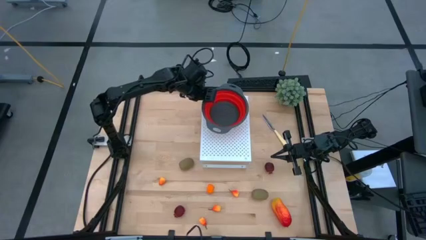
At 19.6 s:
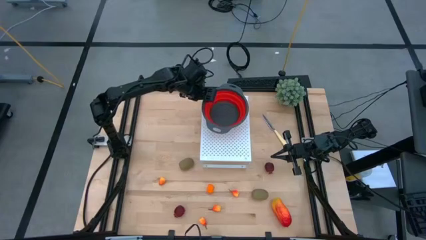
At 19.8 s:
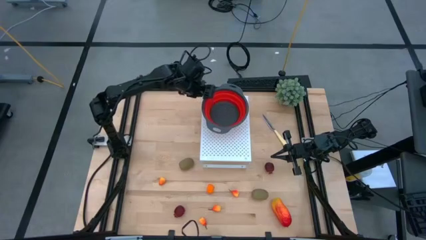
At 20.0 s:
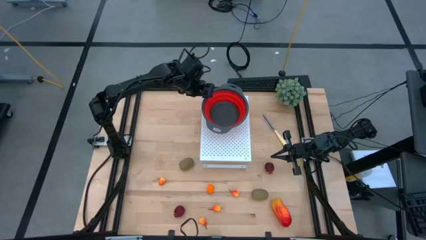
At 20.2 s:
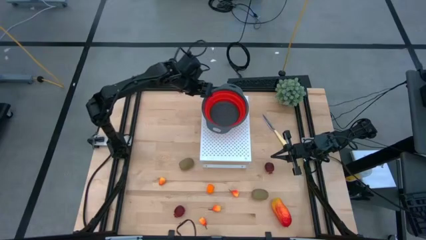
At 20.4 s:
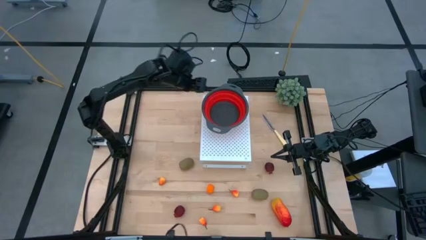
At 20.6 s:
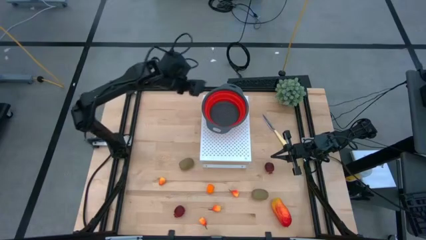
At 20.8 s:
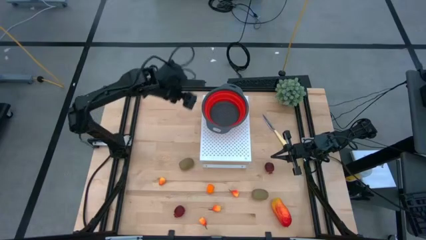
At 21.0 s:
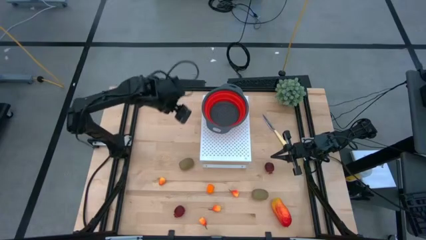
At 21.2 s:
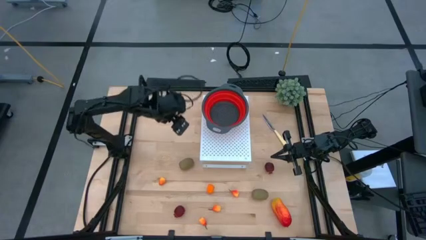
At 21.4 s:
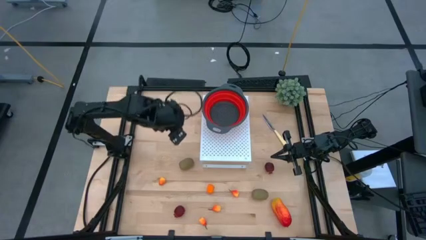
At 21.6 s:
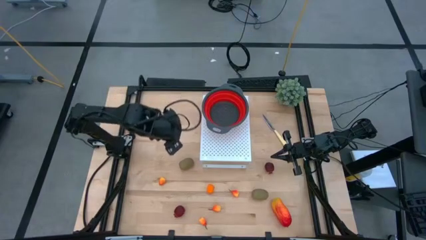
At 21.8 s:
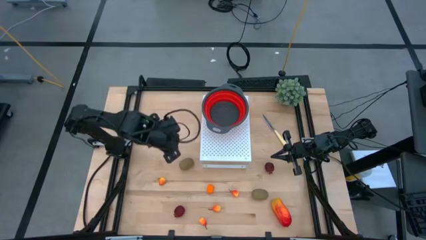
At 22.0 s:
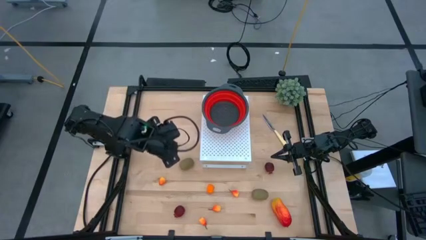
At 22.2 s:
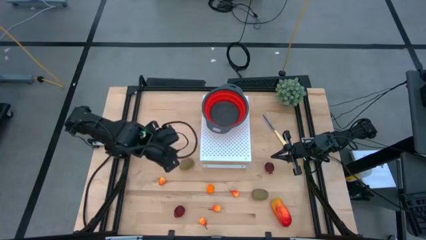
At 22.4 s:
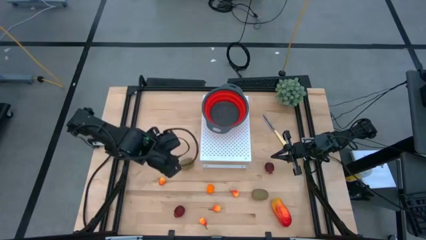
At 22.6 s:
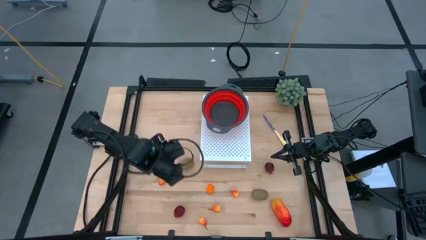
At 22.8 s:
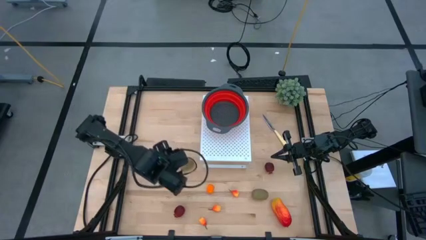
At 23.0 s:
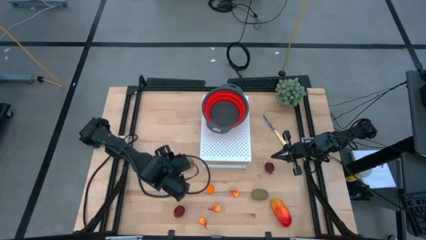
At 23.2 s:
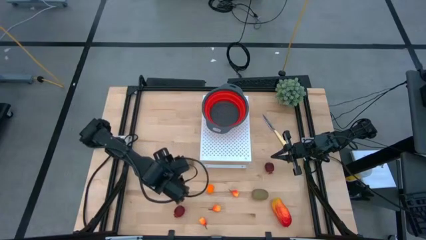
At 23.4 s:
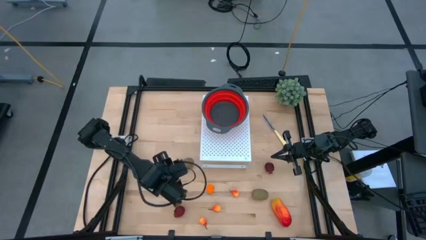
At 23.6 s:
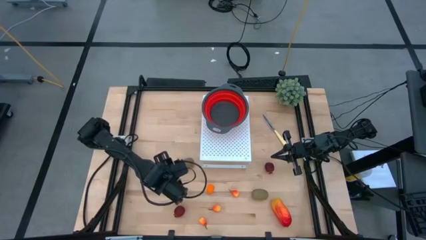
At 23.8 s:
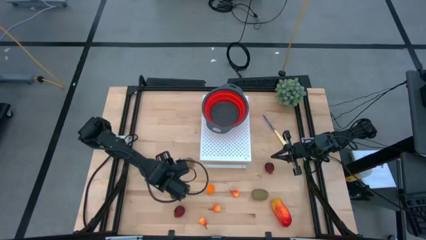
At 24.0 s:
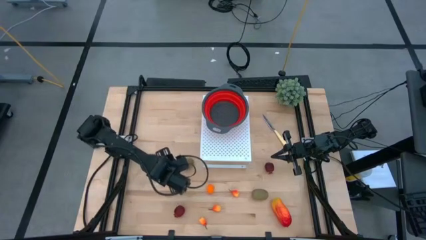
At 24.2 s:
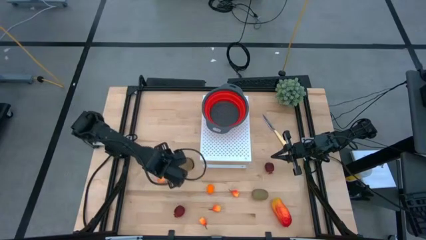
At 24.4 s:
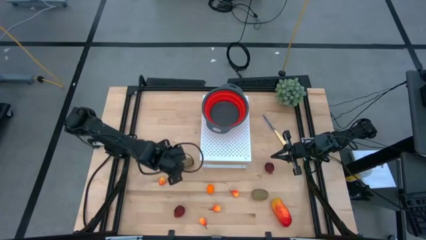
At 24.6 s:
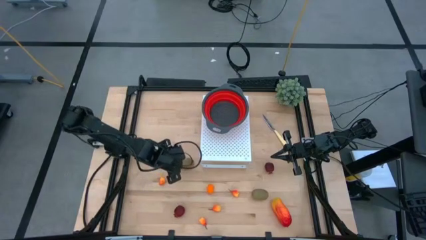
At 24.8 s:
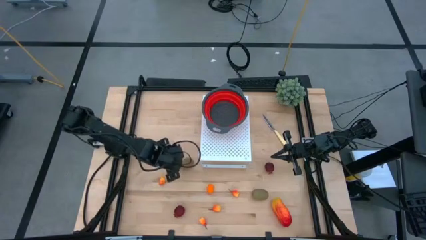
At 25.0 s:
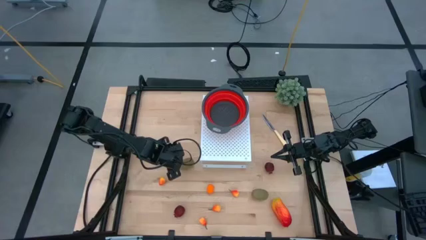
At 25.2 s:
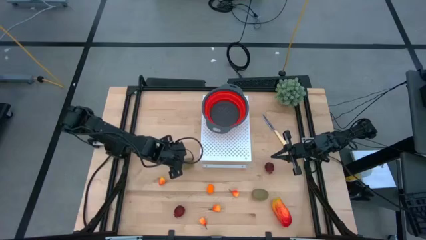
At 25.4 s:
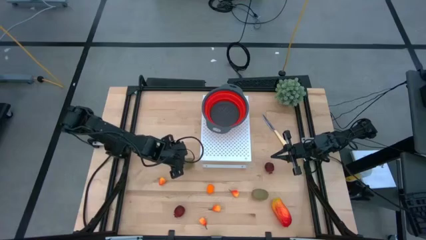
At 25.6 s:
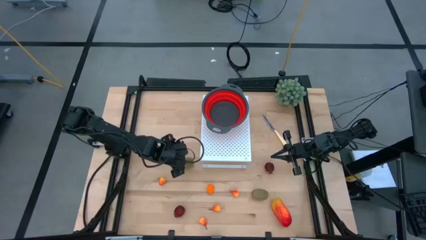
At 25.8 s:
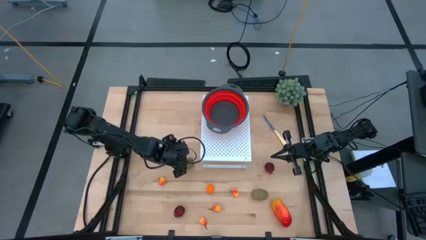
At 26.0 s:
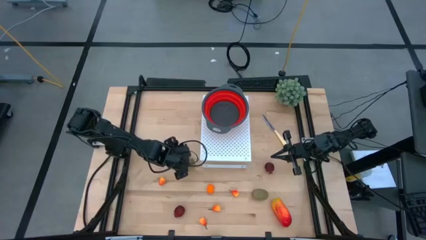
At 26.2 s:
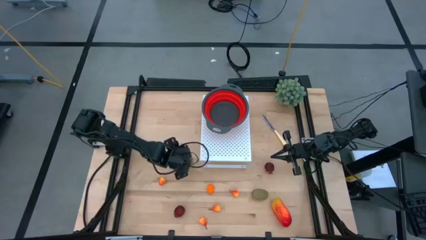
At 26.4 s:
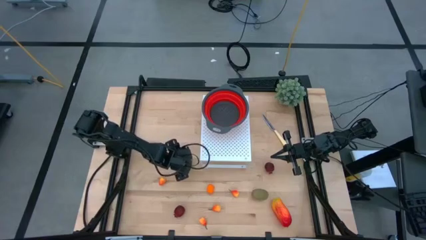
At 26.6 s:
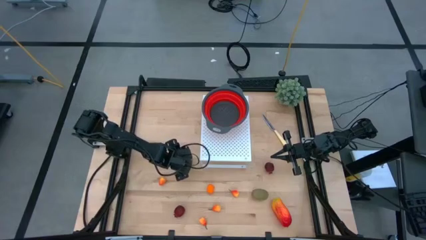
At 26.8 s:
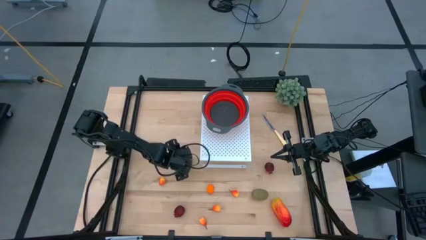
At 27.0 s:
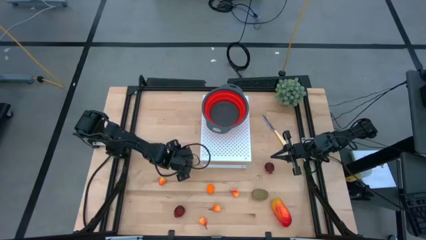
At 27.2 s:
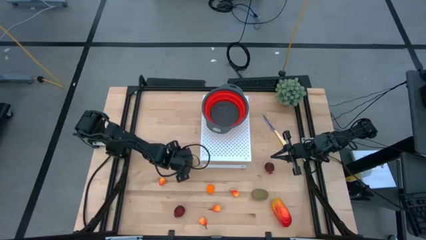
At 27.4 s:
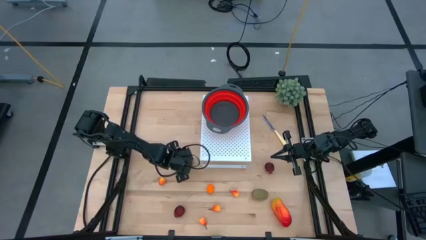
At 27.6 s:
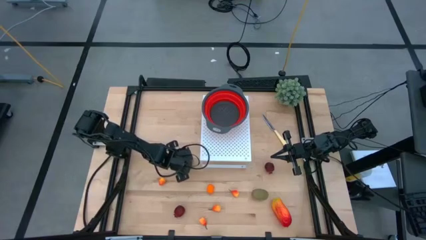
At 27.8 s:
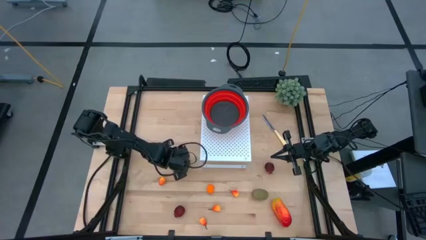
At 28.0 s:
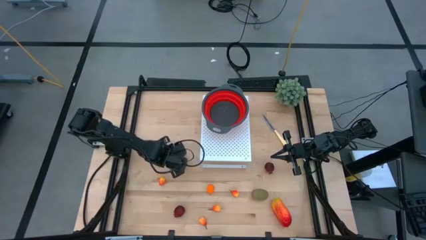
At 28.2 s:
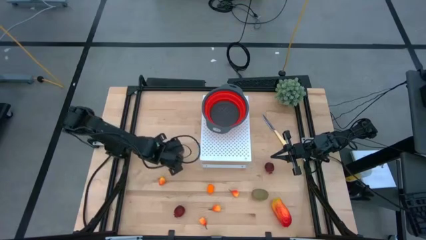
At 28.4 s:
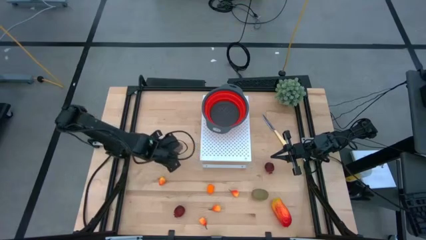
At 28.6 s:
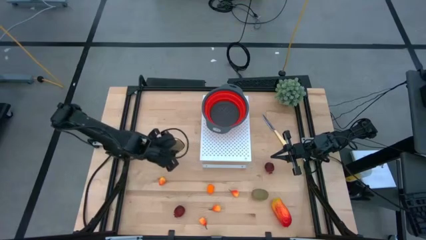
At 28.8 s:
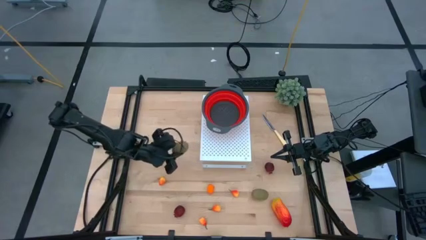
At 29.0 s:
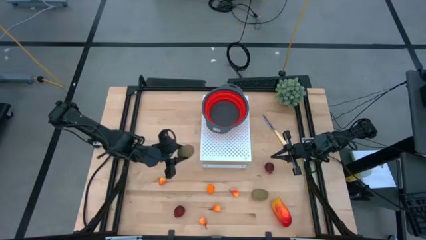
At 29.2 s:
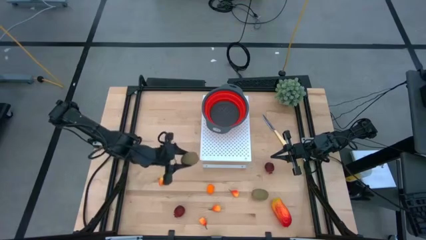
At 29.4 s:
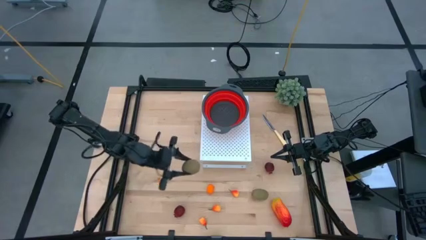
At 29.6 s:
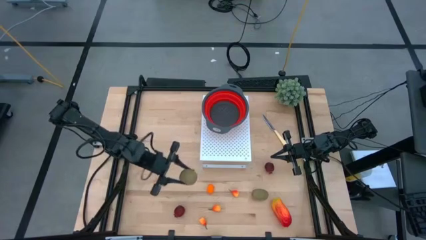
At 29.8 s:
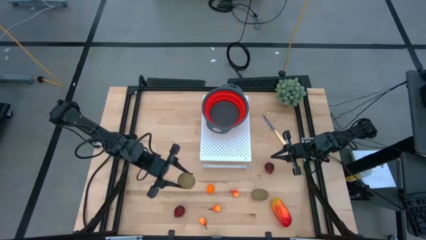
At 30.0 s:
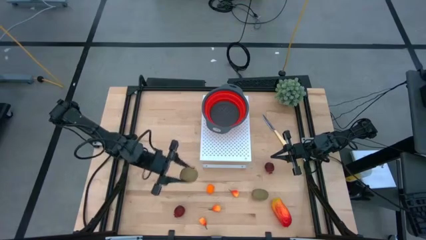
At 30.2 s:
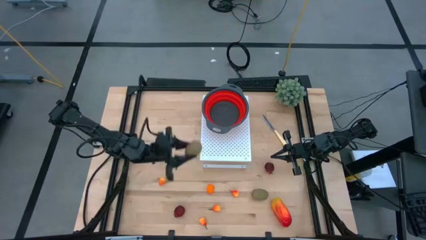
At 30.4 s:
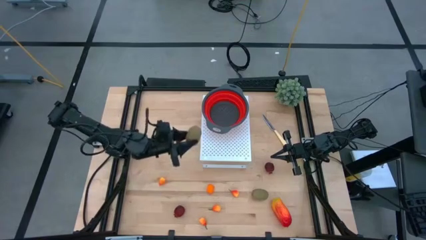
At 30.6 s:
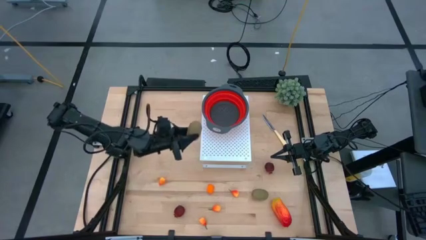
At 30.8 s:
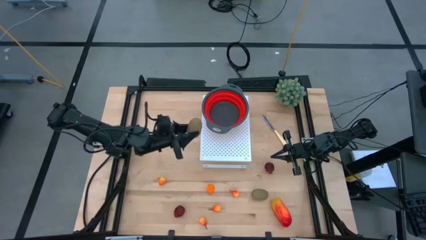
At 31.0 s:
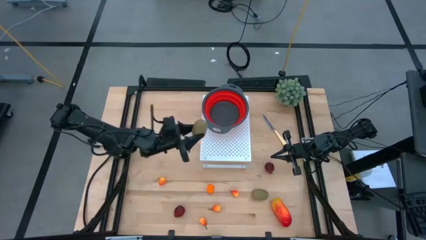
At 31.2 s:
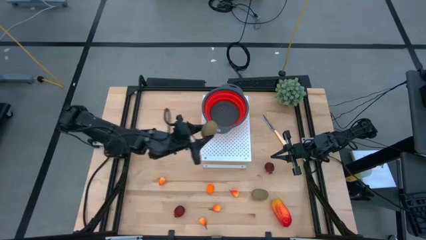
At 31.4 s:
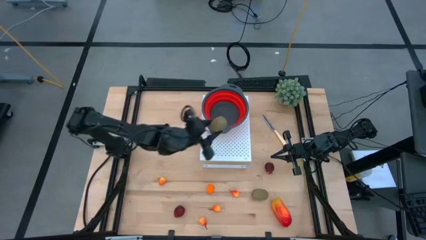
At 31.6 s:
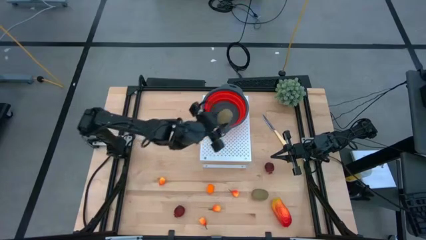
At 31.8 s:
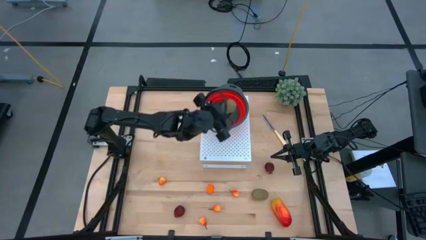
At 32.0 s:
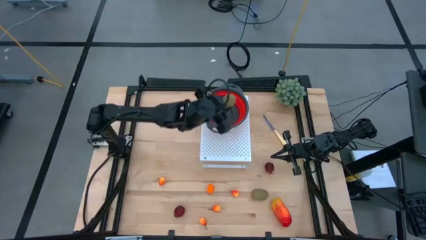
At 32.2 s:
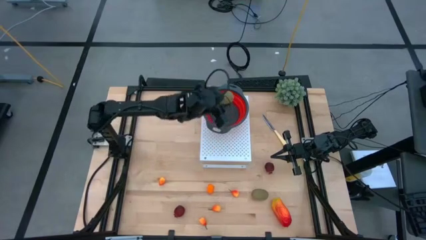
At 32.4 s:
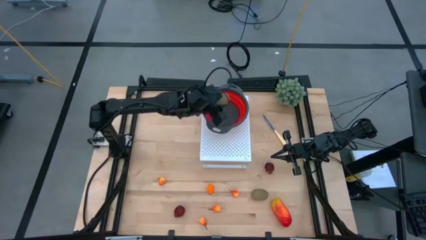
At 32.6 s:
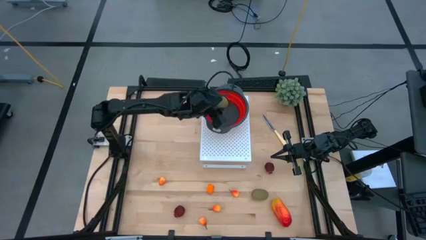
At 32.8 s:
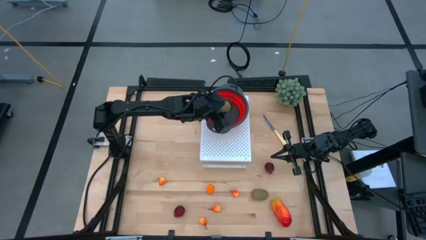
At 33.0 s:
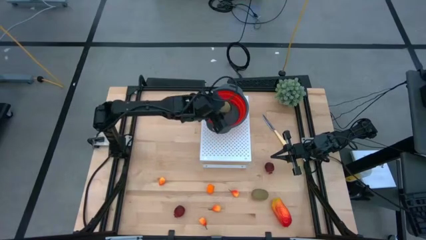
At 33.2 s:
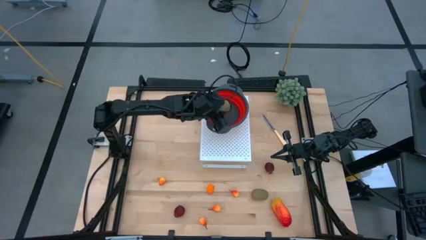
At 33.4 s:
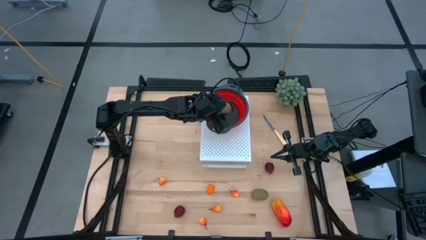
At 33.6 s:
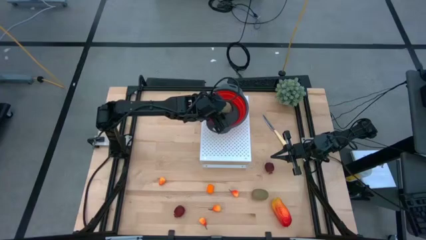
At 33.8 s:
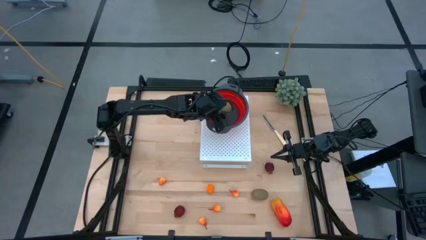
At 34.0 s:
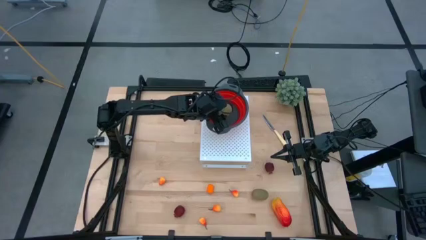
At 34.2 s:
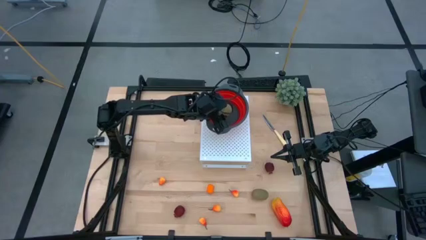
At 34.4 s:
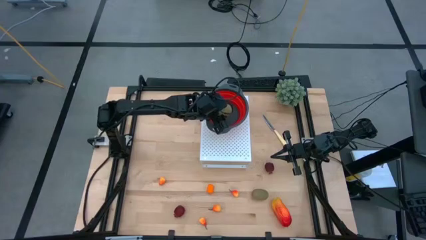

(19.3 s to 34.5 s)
Task: Pick & Place Fruit
Put the green kiwi into the red strainer bowl
